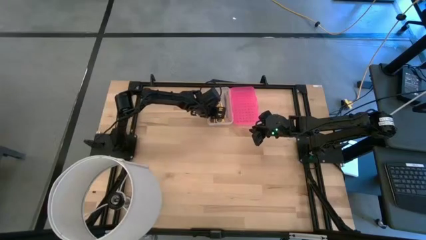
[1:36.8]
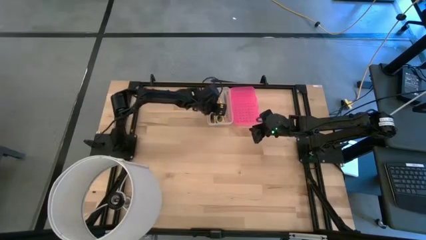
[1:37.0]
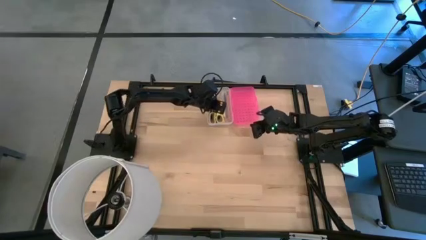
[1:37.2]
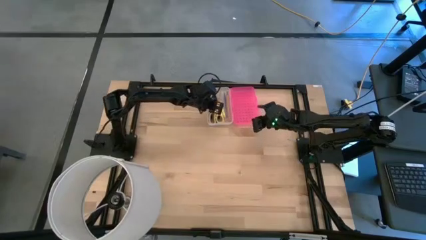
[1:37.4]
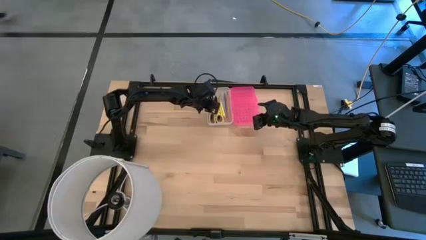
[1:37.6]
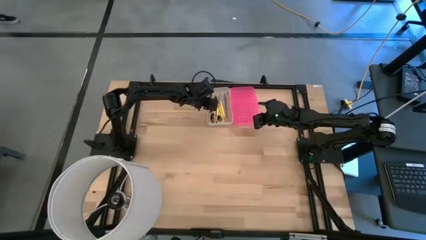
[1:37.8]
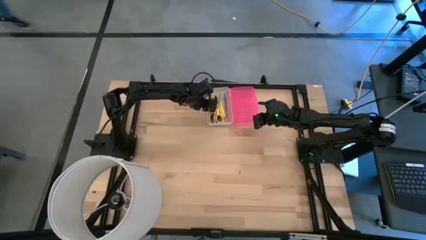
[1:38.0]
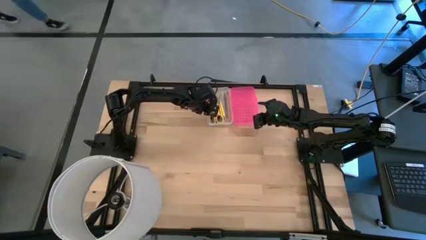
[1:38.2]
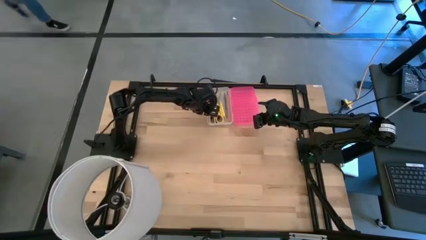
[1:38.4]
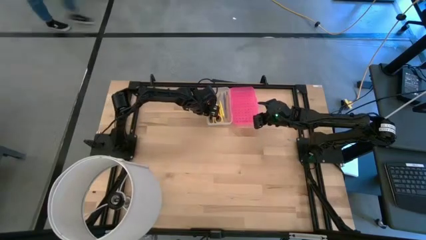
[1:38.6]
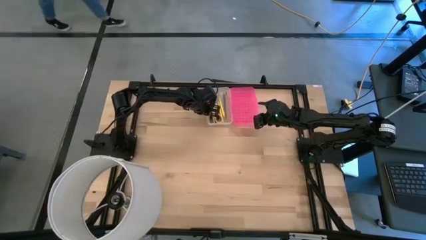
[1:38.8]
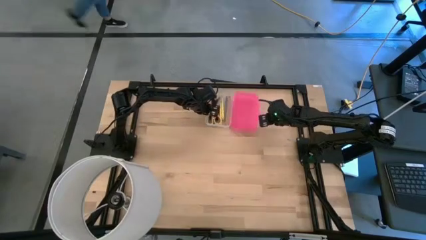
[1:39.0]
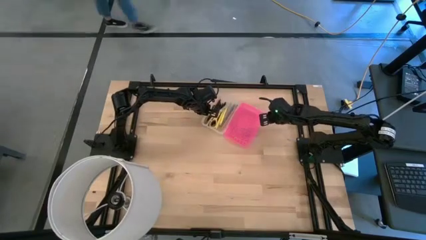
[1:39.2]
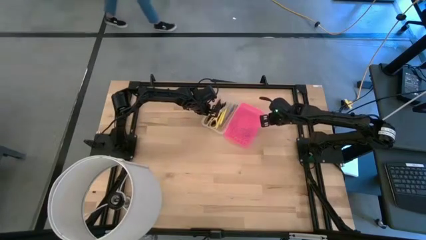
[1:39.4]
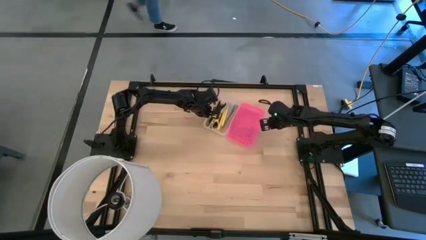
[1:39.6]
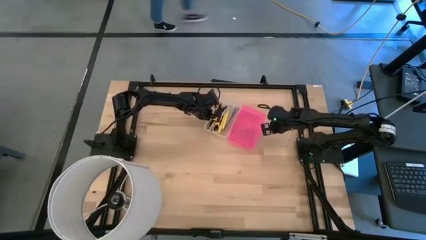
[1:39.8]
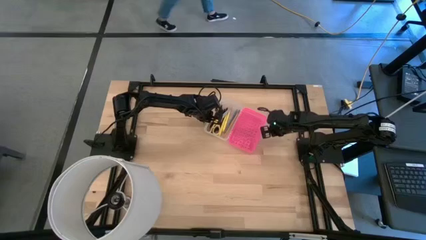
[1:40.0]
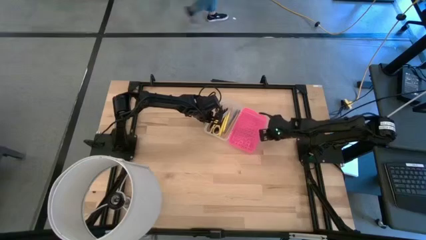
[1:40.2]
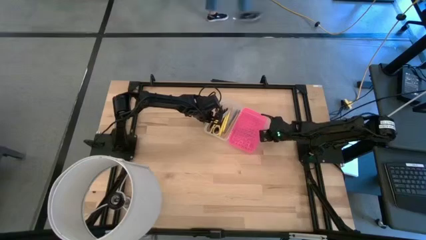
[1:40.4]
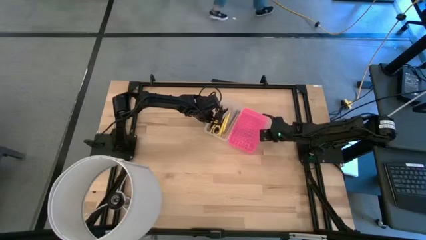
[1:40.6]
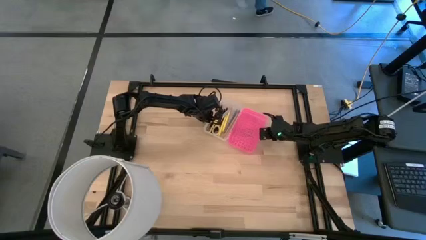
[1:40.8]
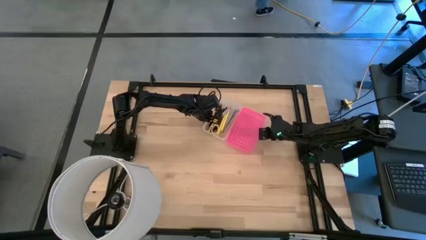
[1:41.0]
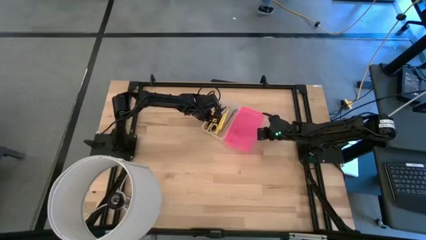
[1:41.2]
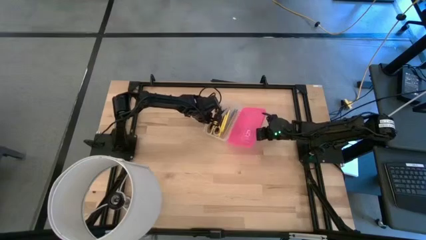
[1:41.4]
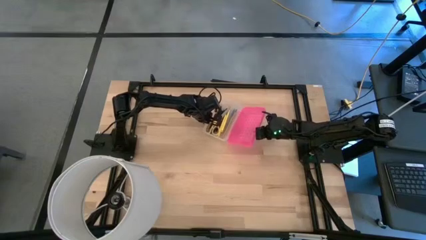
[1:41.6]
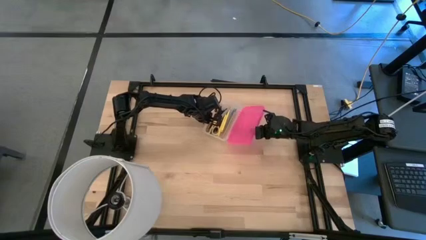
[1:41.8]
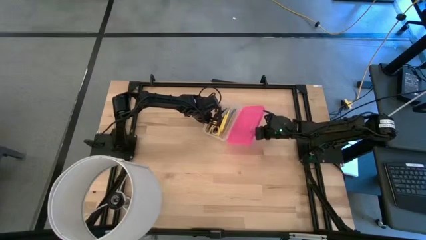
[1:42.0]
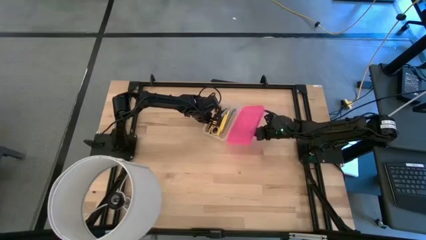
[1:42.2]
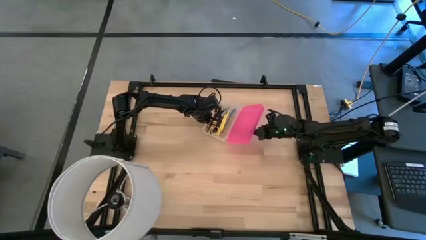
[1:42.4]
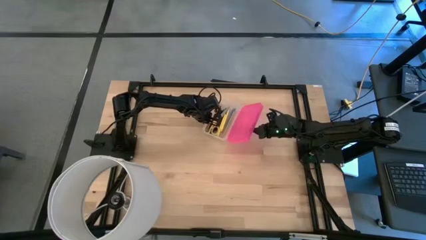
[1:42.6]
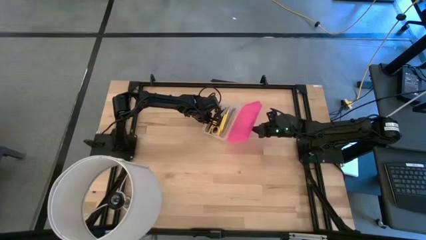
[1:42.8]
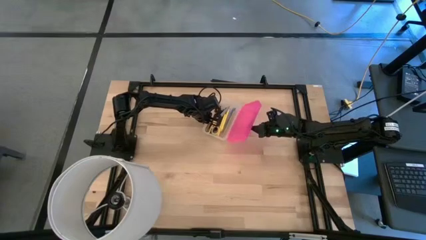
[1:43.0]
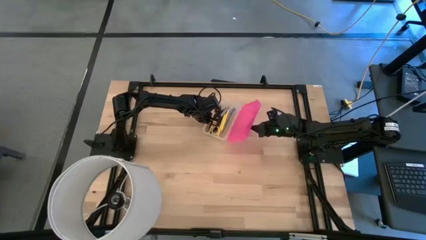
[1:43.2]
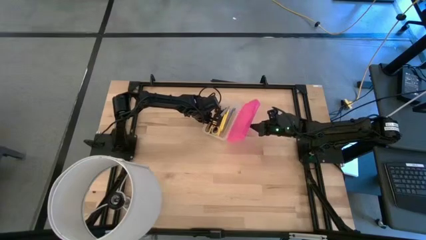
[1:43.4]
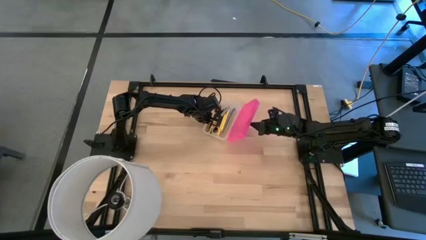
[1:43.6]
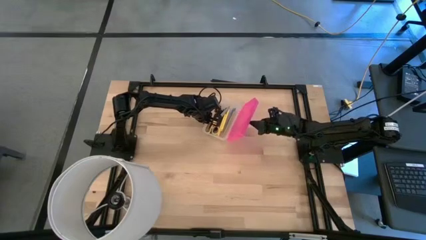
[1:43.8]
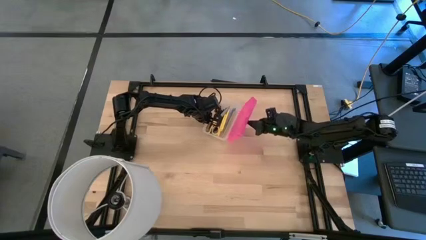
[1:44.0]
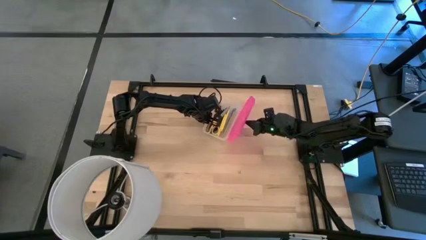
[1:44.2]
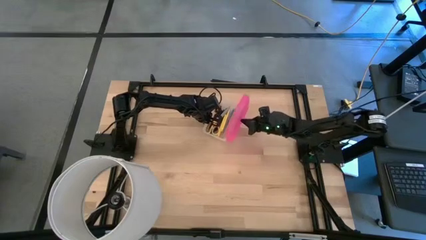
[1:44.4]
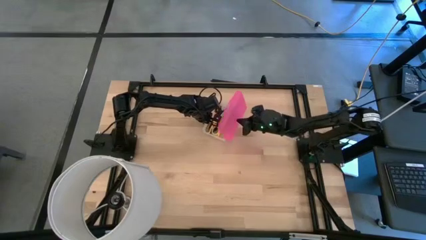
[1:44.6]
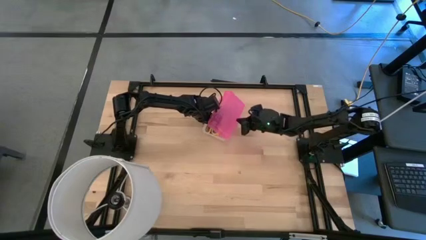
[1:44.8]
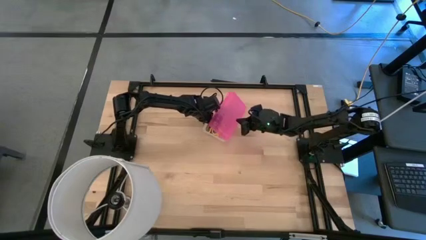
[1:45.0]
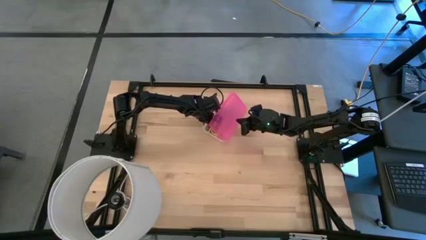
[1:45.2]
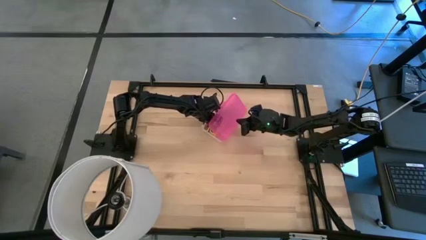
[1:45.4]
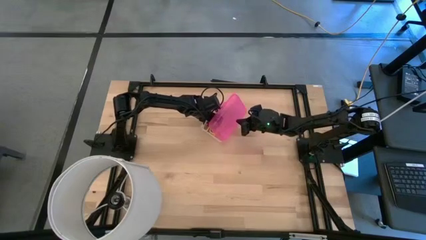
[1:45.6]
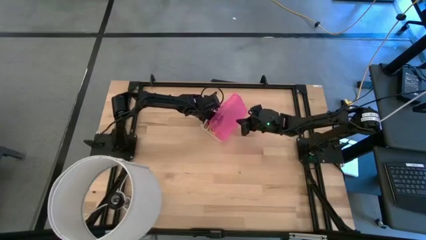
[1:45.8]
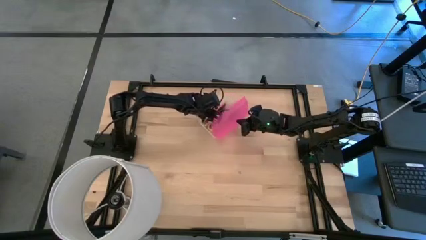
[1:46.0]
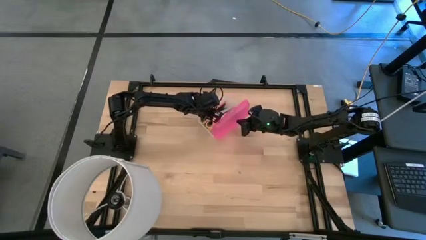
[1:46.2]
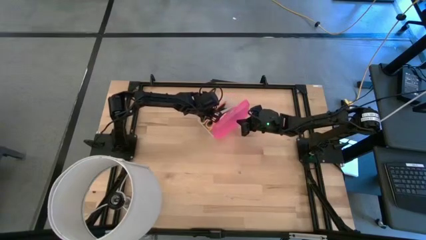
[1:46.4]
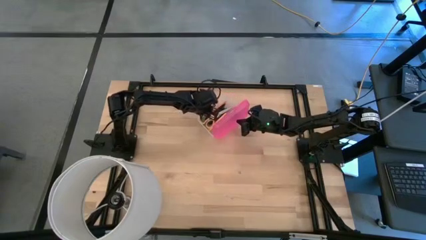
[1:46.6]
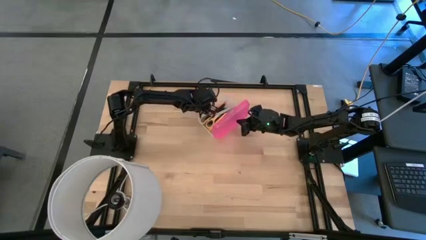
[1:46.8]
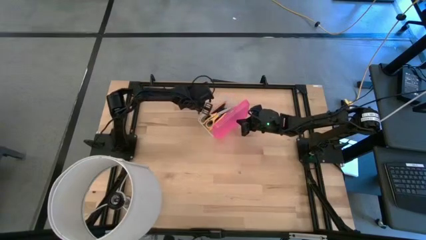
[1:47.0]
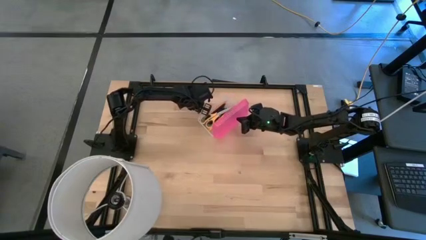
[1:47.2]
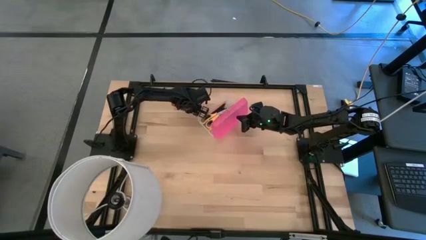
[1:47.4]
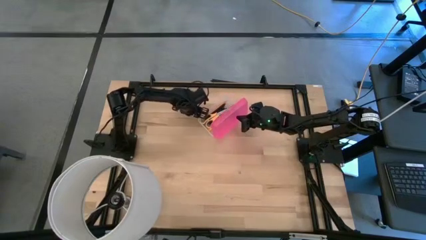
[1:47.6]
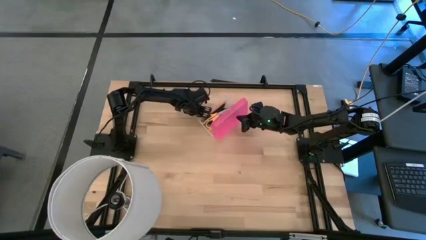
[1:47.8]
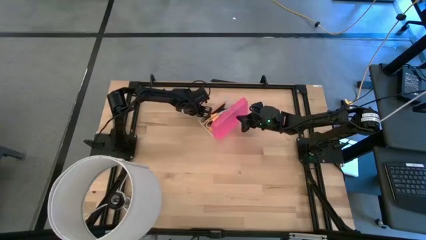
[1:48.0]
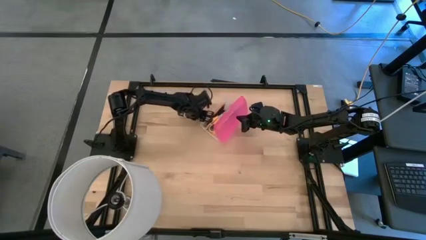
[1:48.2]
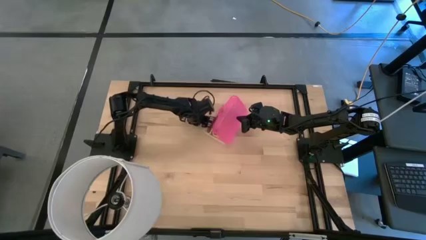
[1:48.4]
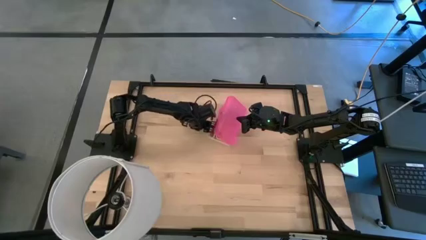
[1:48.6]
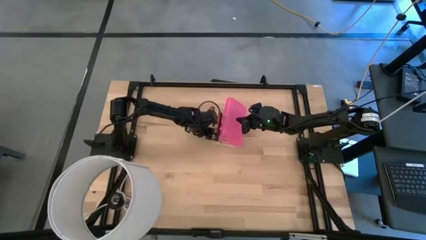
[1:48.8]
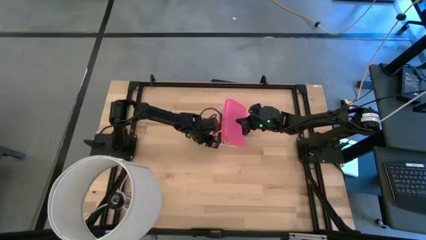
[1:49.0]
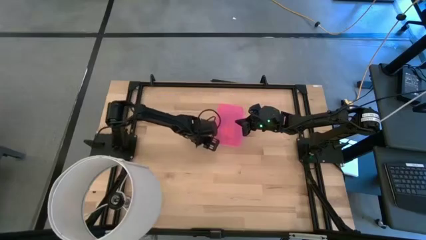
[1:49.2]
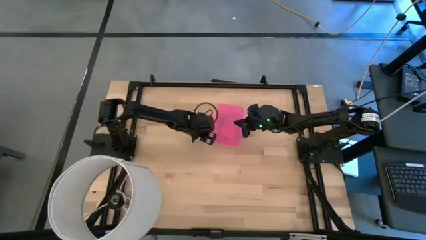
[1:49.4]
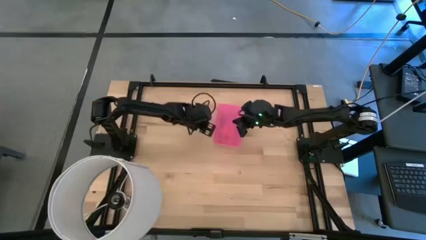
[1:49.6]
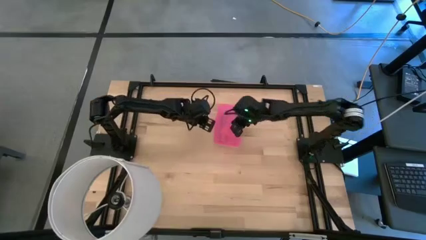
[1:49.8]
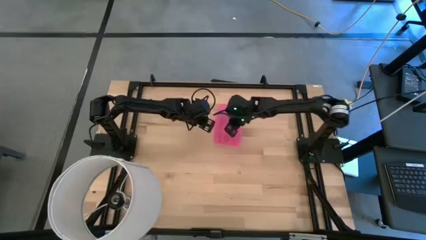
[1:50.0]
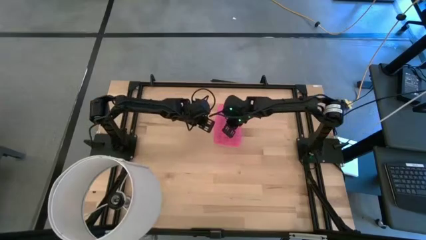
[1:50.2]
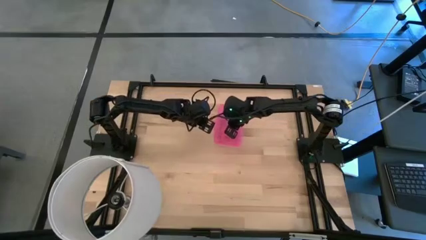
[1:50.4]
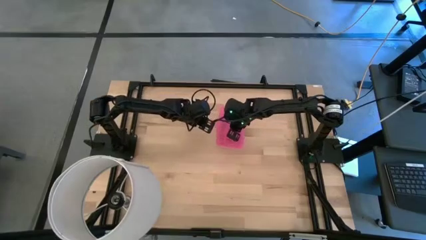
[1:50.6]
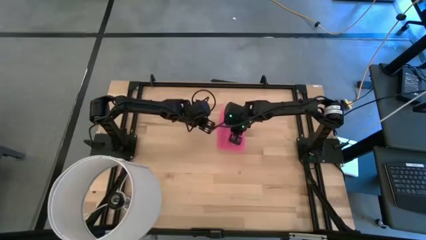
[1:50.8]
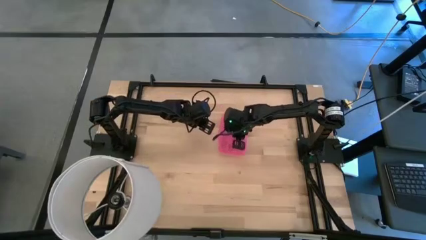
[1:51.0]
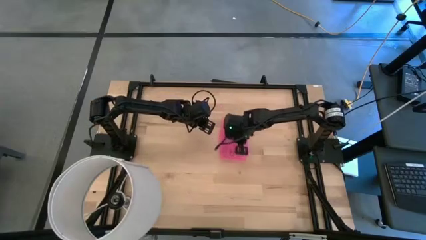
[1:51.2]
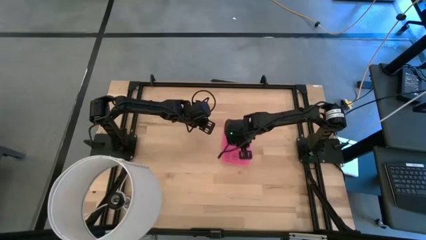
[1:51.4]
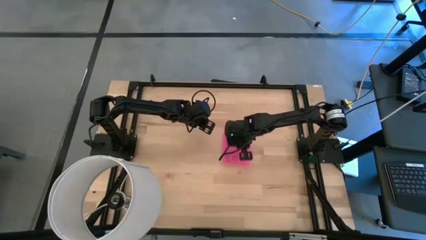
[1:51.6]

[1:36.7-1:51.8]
Task: Pick & place school supplies into a supply box
Close the transparent supply box
